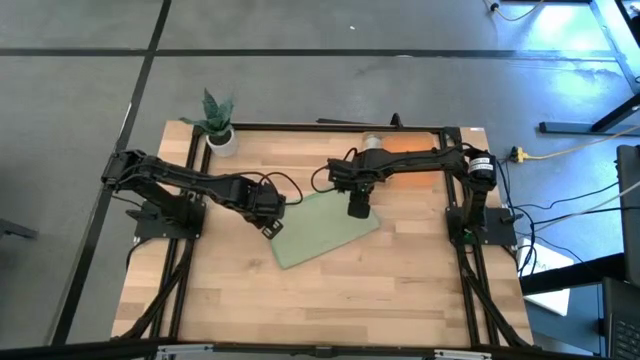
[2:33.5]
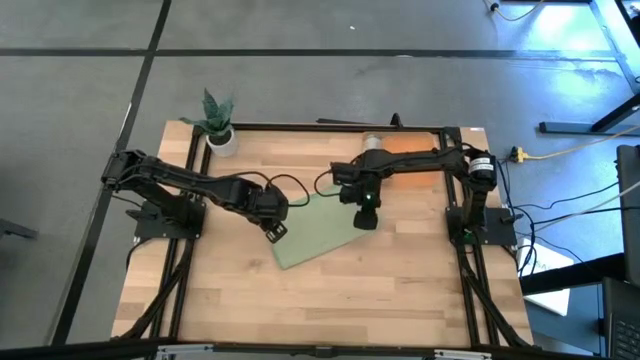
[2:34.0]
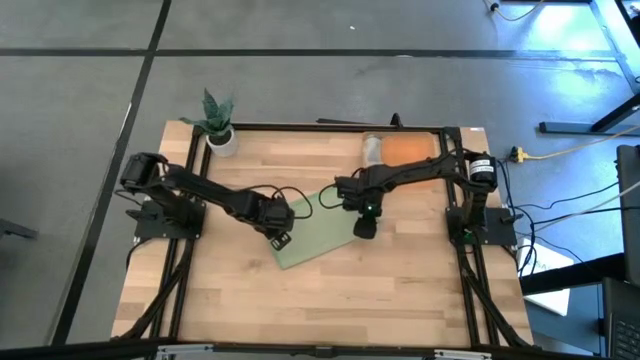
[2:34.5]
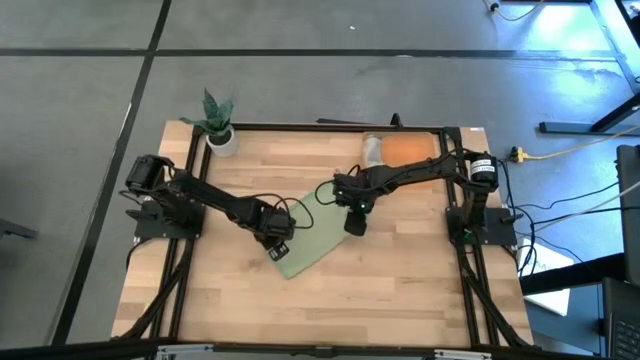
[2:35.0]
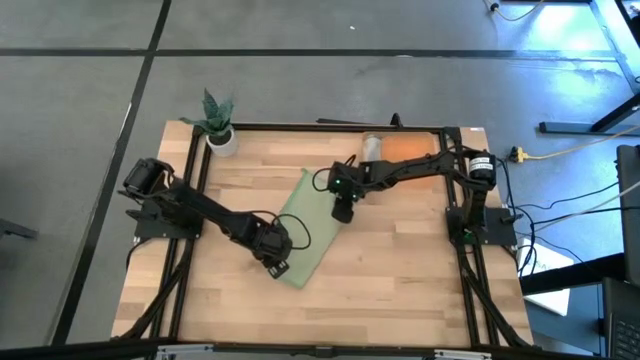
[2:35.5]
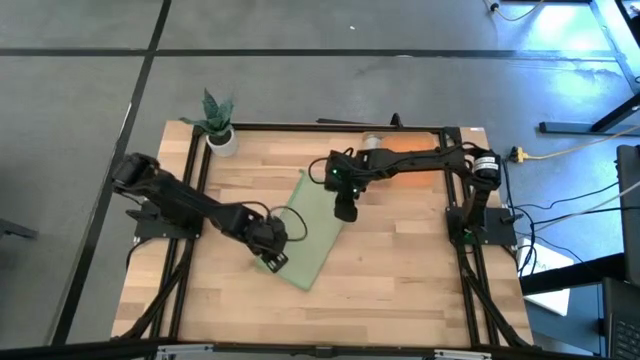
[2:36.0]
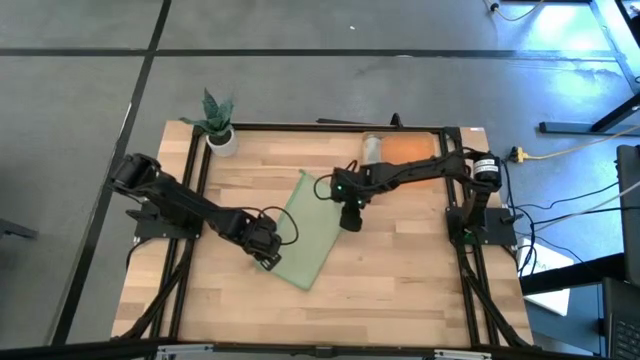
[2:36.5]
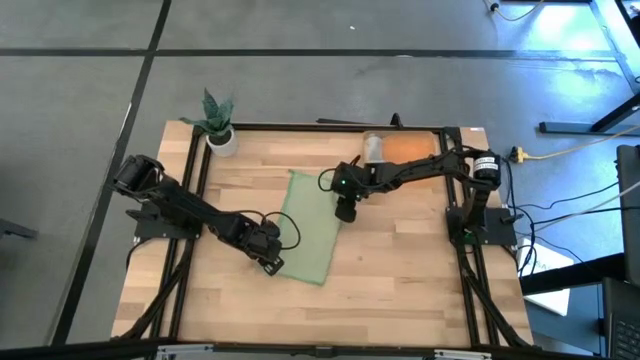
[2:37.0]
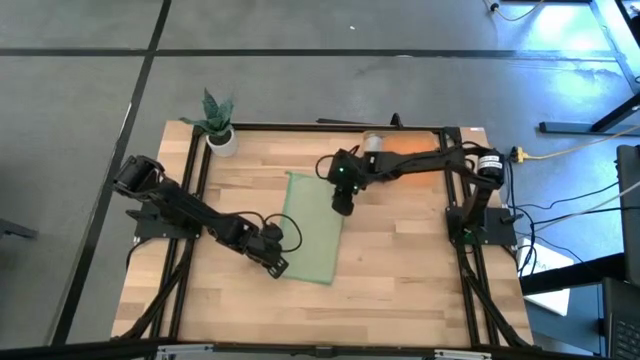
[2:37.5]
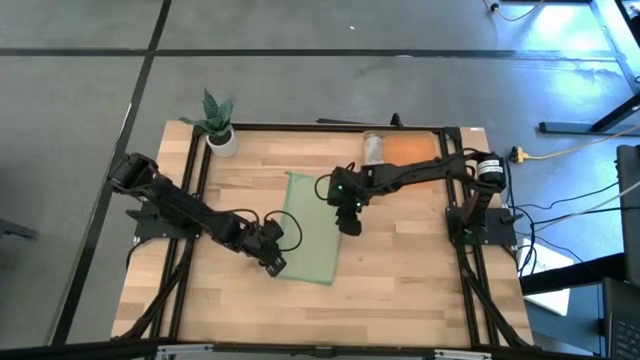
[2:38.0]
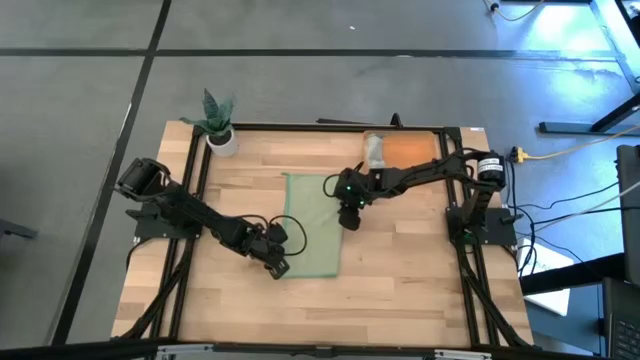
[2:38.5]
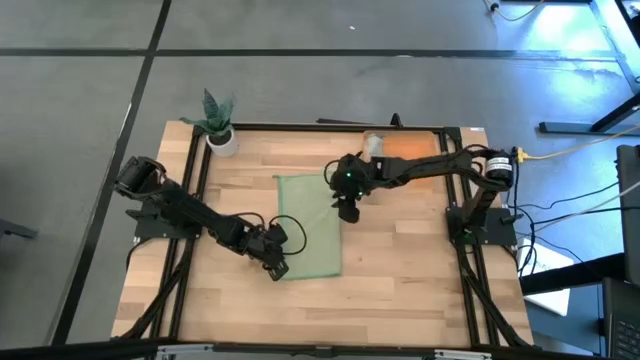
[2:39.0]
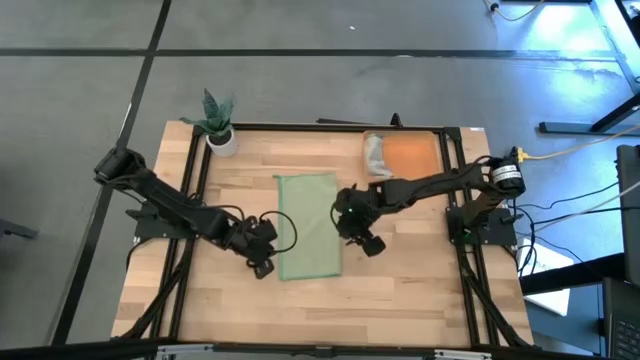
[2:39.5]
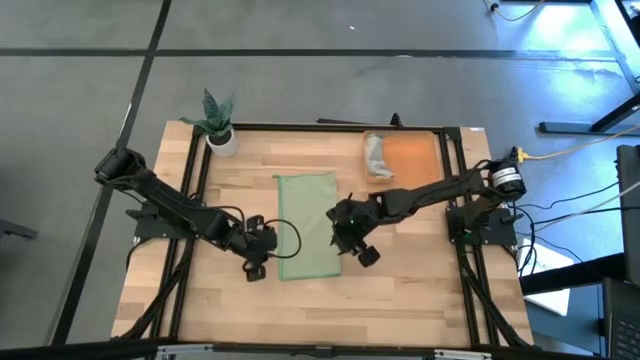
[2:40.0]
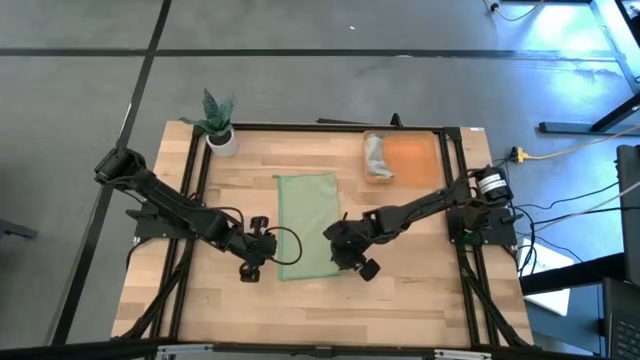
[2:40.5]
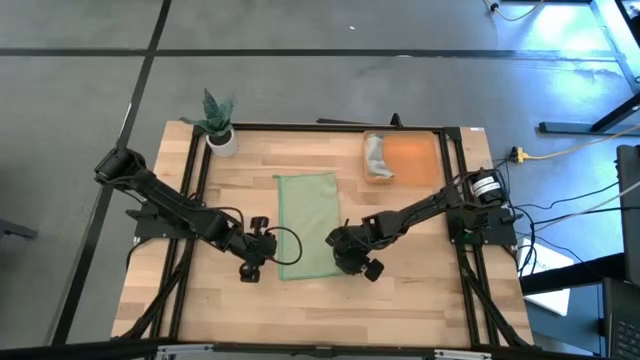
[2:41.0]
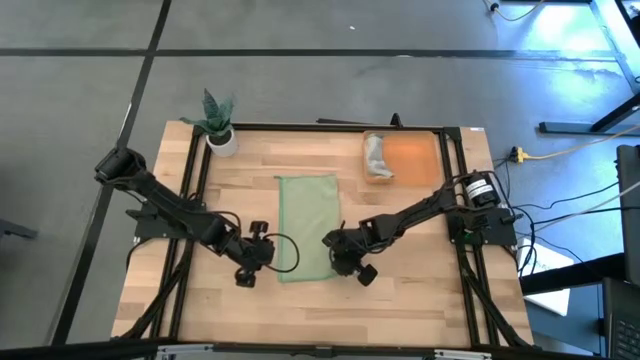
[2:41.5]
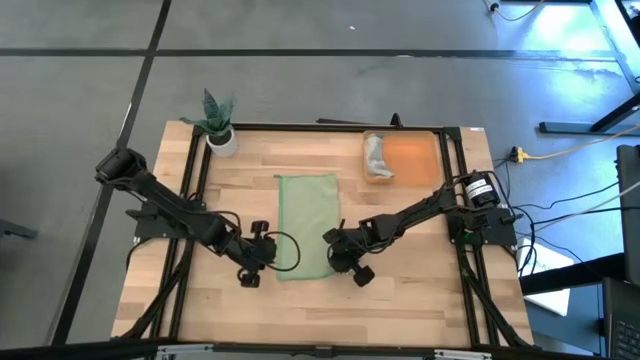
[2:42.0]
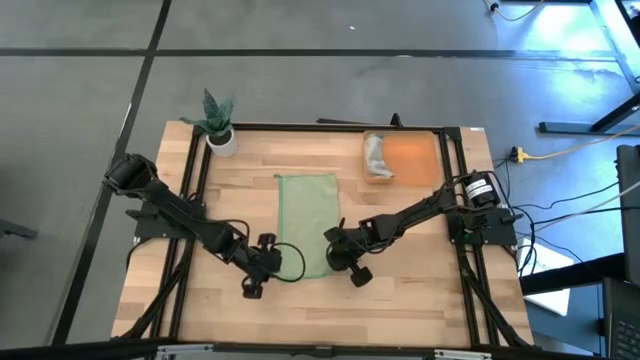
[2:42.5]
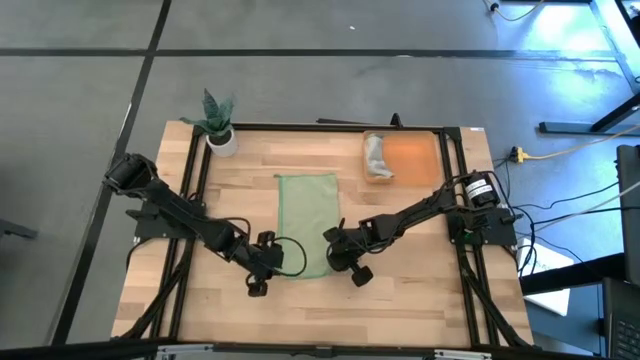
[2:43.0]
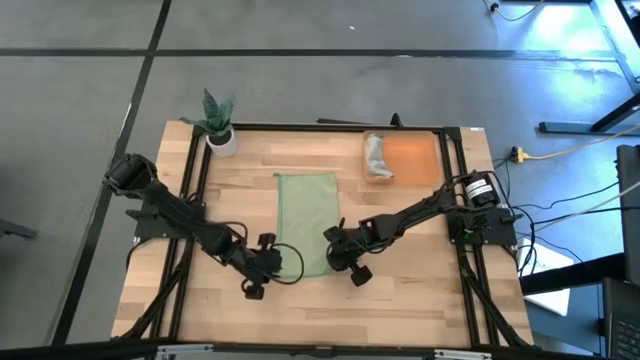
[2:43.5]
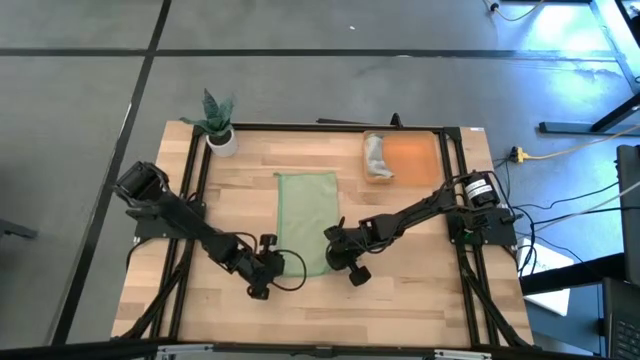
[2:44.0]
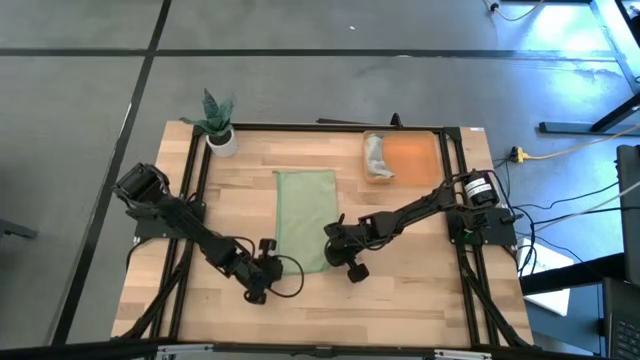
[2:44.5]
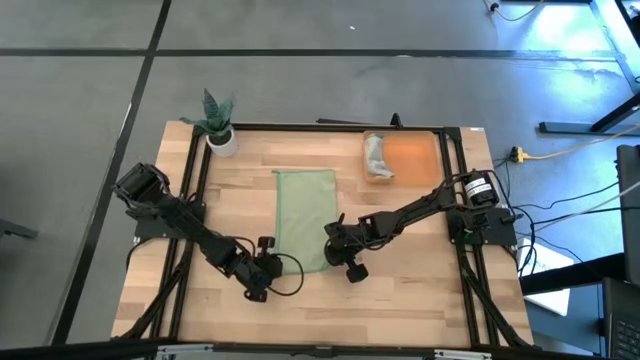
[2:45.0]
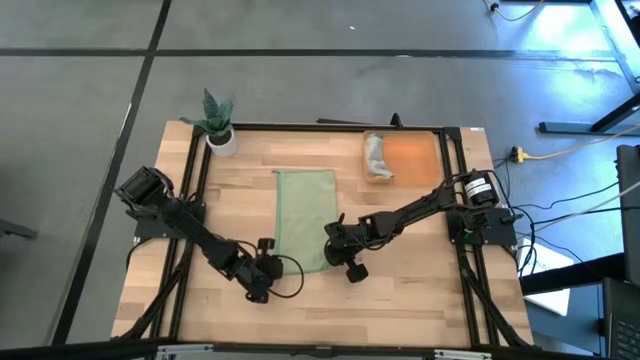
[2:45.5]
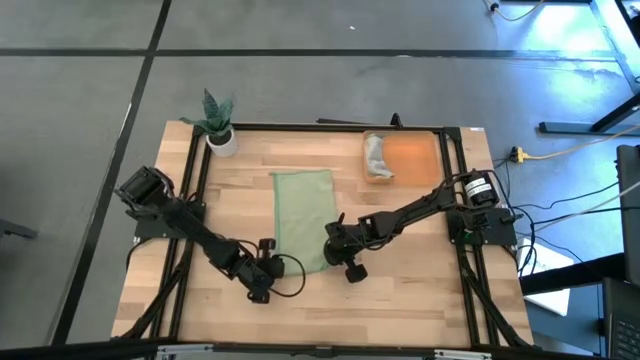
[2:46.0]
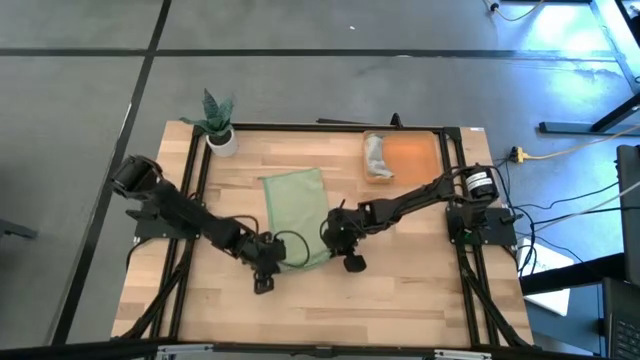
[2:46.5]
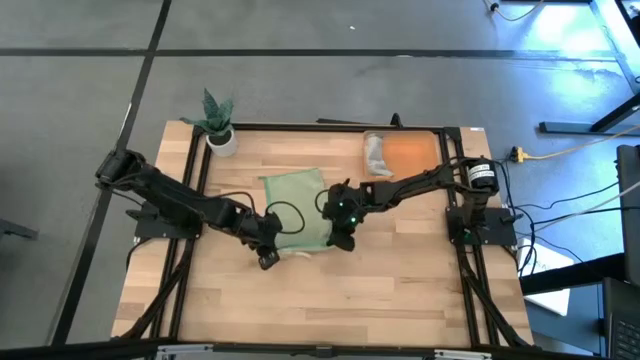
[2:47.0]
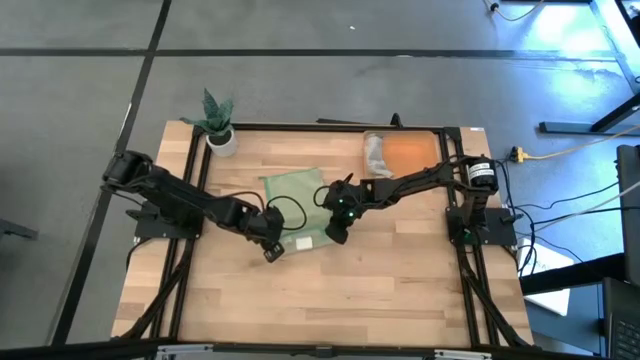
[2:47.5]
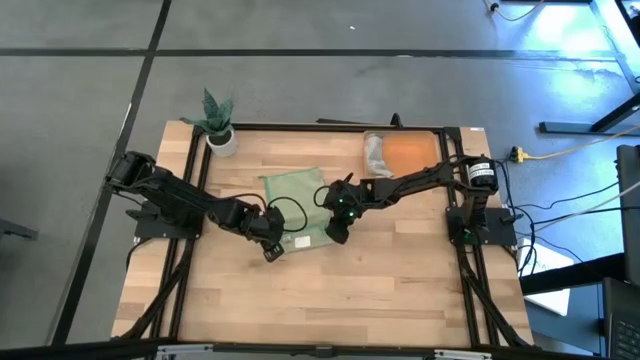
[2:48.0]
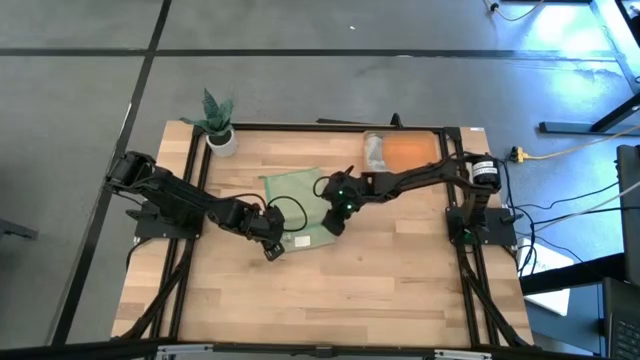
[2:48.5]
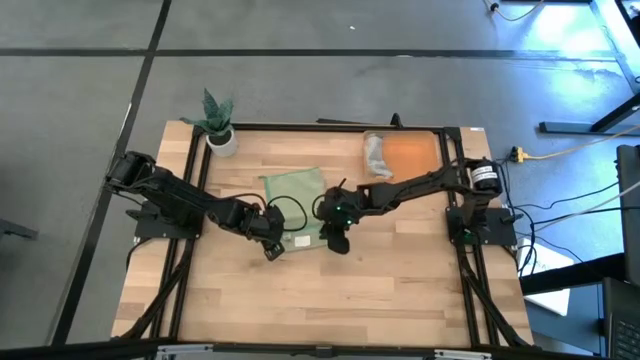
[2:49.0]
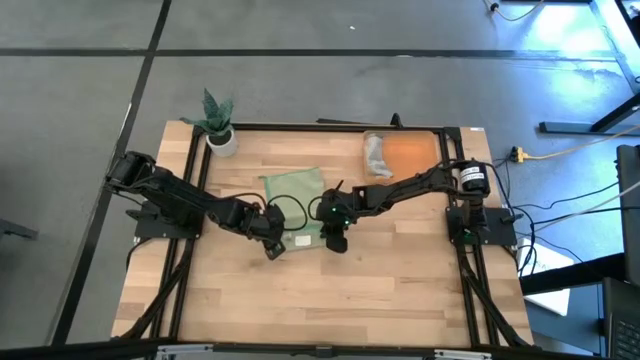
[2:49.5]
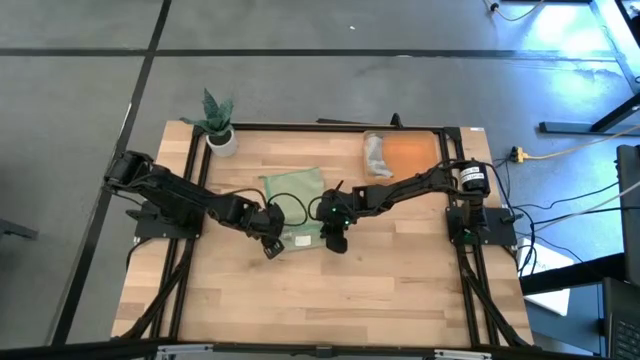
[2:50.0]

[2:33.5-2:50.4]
Task: Roll microfiber towels into tight, uniform cylinder then place into a basket
Roll the green microfiber towel

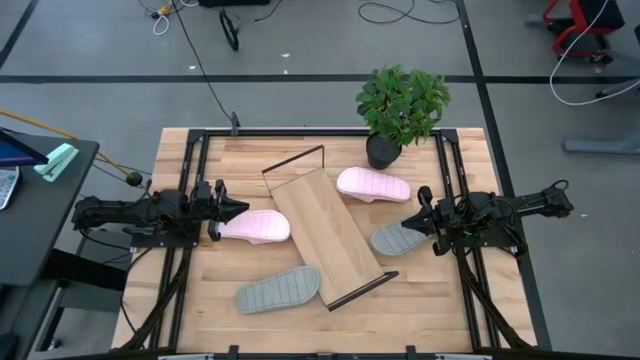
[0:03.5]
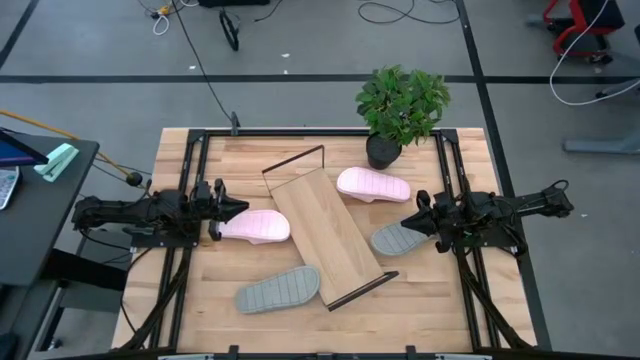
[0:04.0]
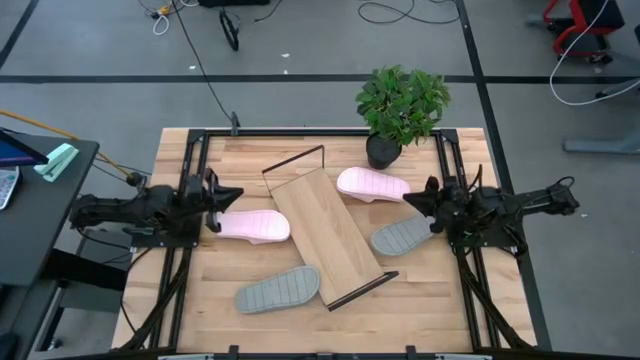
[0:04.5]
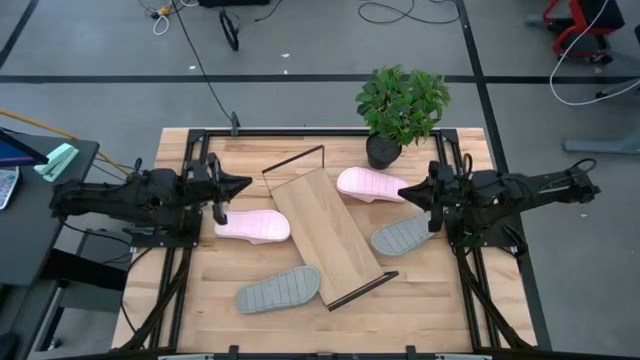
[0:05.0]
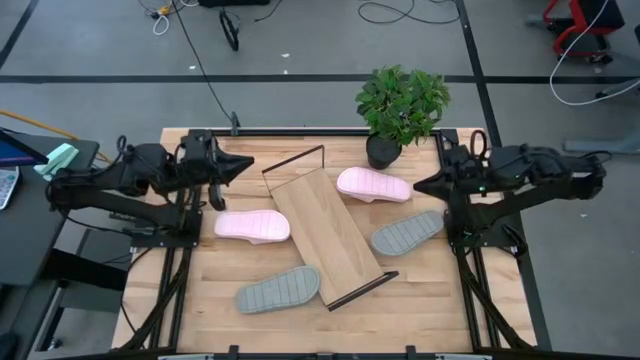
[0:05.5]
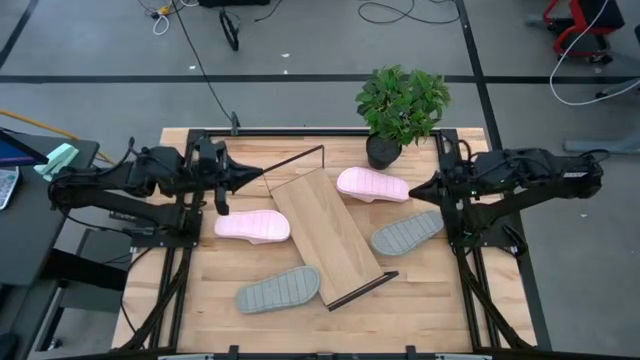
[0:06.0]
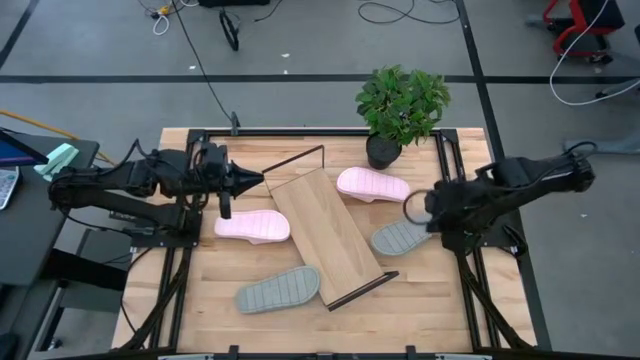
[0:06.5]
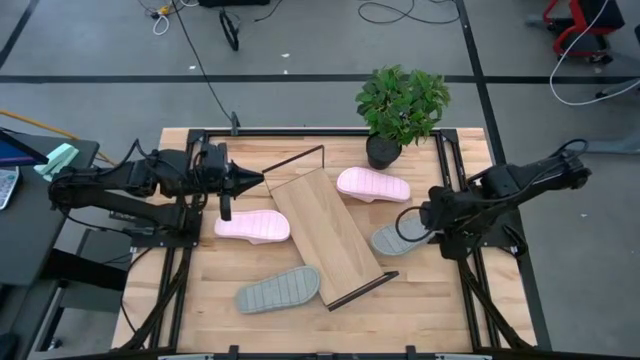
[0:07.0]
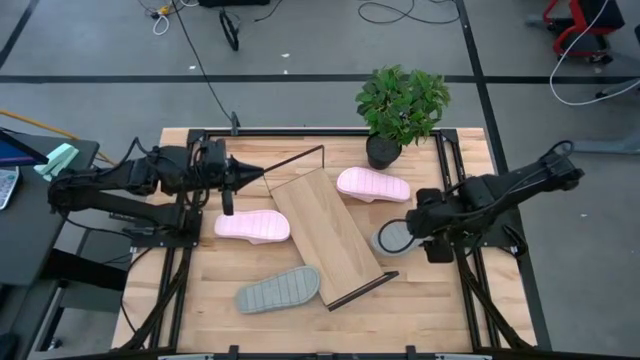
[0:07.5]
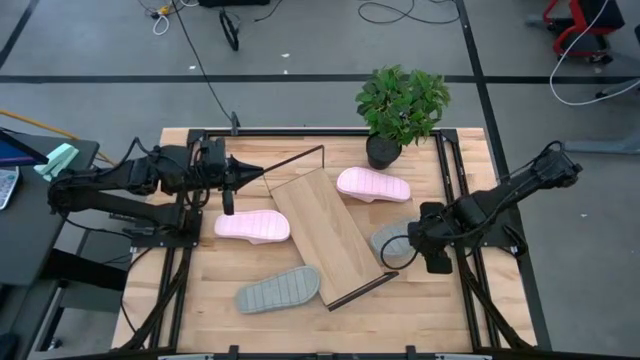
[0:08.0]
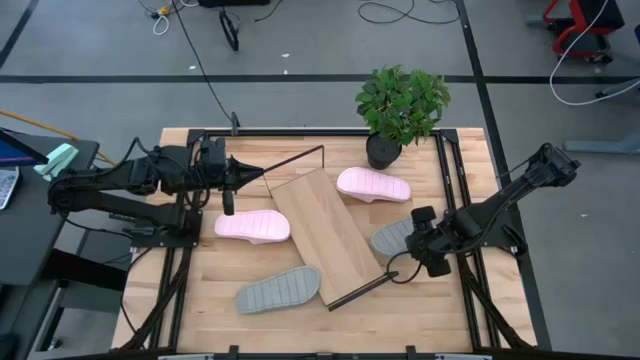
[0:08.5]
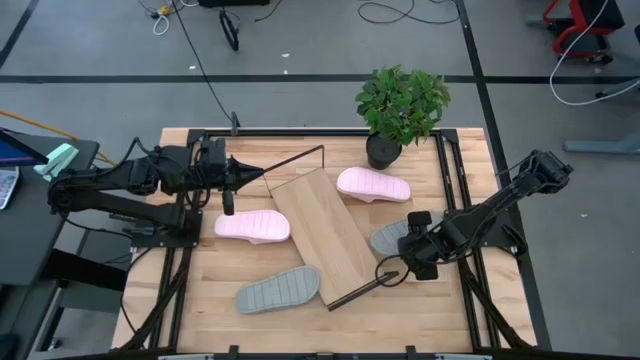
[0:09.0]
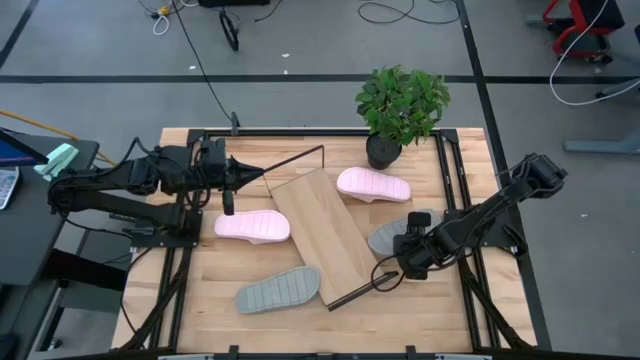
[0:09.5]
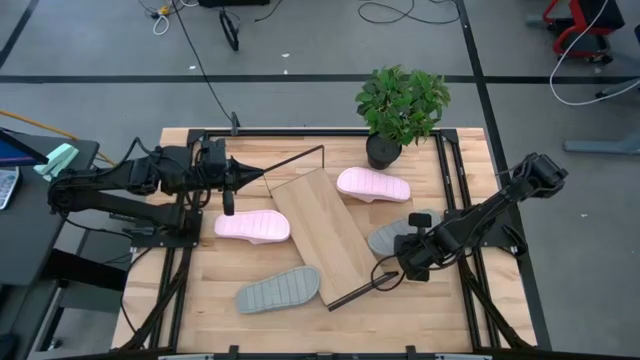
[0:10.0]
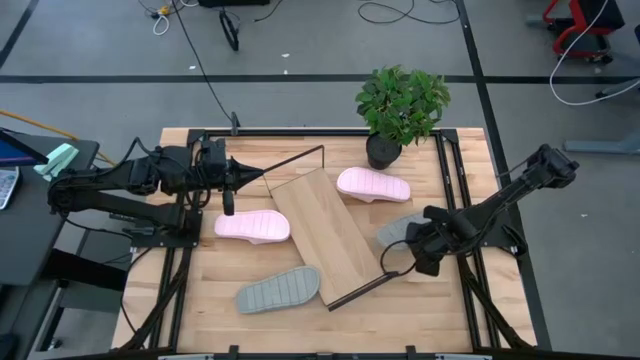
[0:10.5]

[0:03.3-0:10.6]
Task: Pick and place slides into the shelf
Put the right gray slide on the shelf
